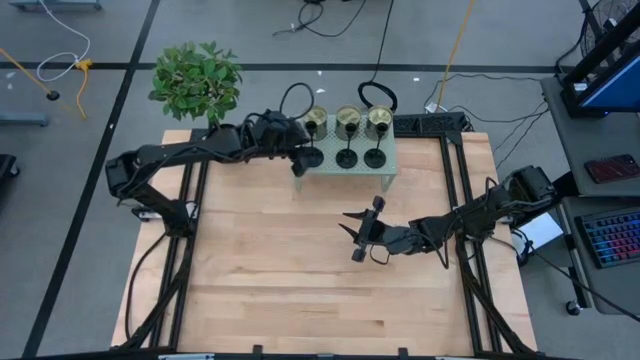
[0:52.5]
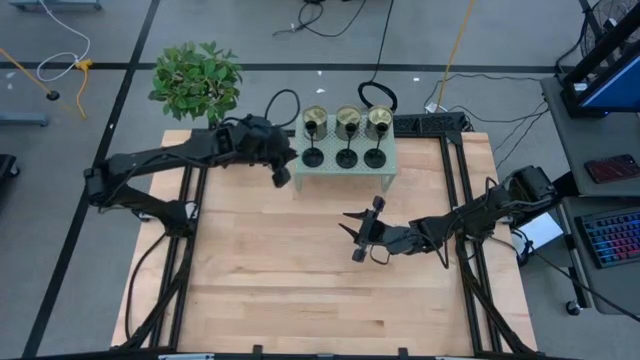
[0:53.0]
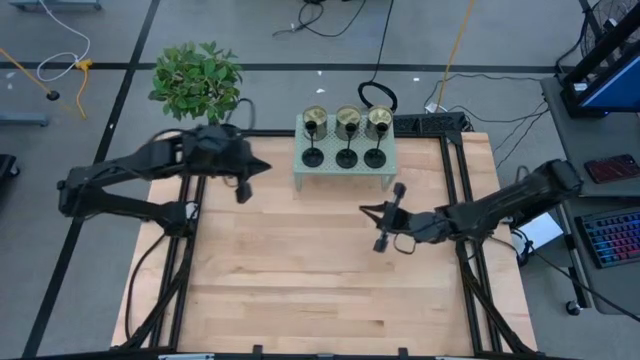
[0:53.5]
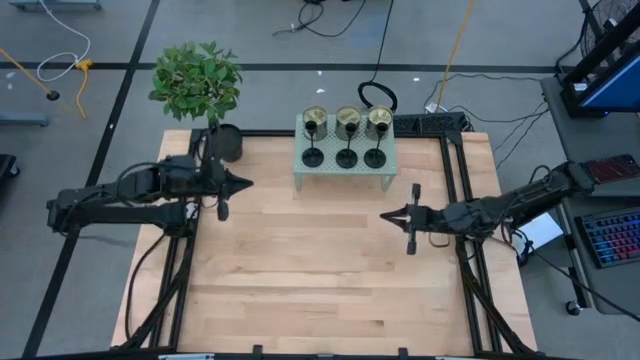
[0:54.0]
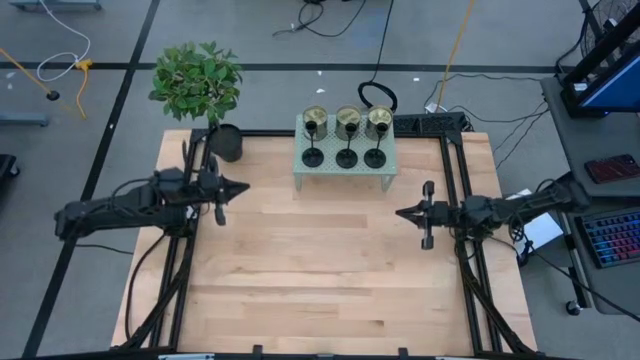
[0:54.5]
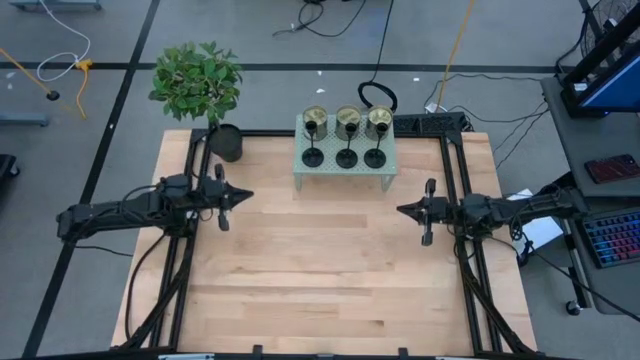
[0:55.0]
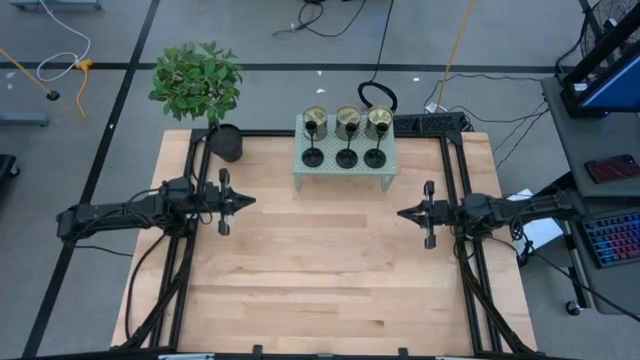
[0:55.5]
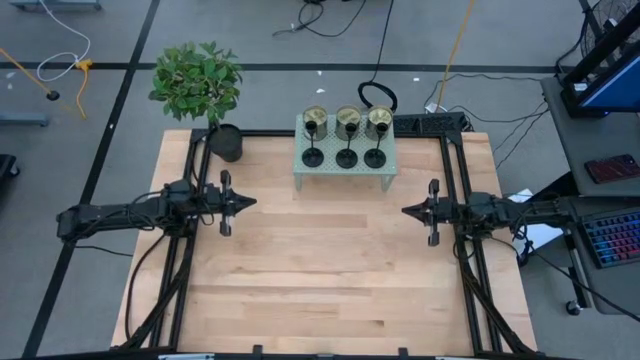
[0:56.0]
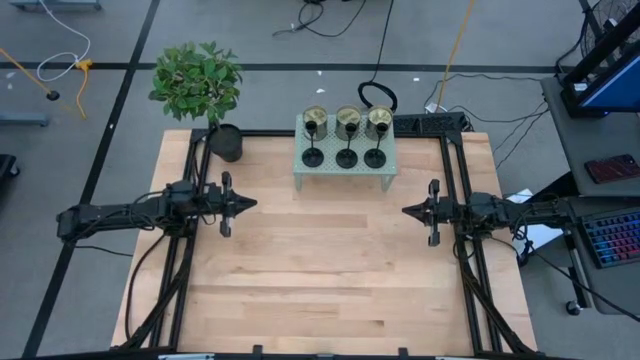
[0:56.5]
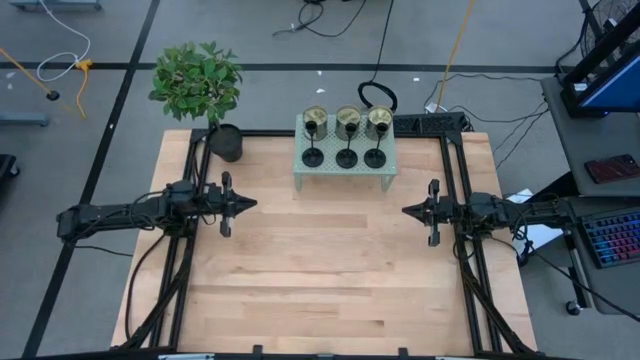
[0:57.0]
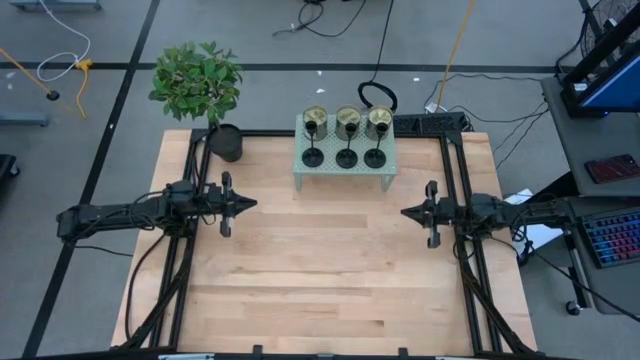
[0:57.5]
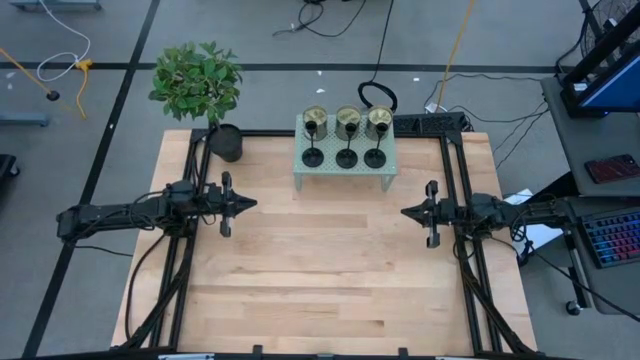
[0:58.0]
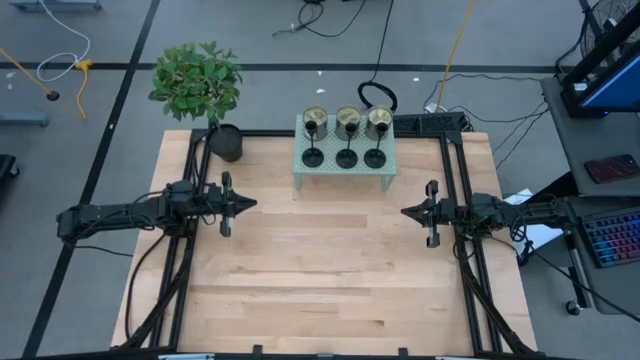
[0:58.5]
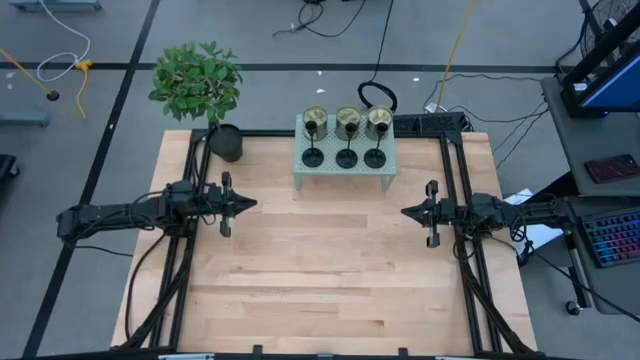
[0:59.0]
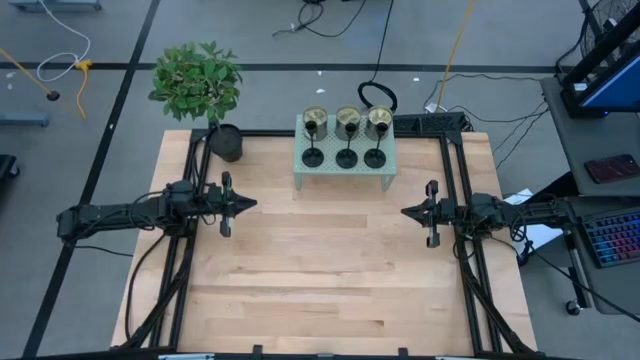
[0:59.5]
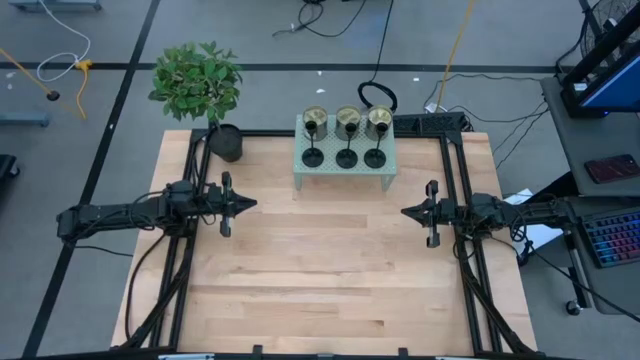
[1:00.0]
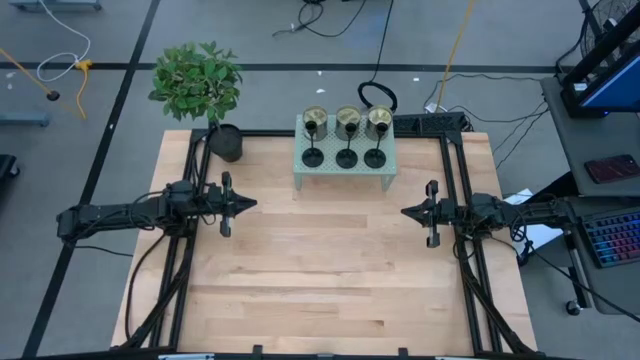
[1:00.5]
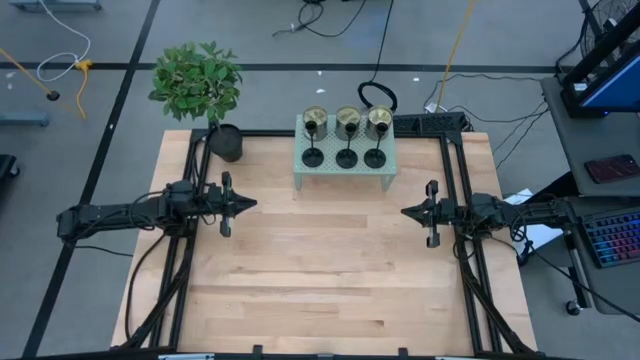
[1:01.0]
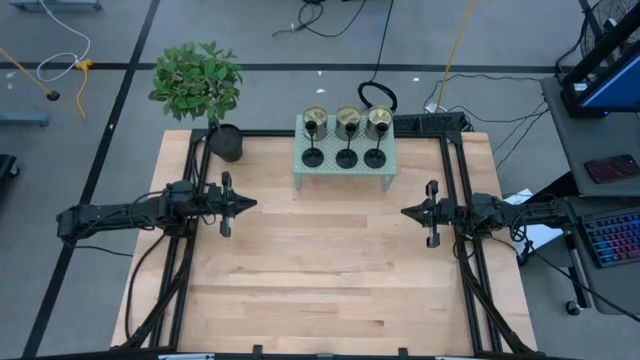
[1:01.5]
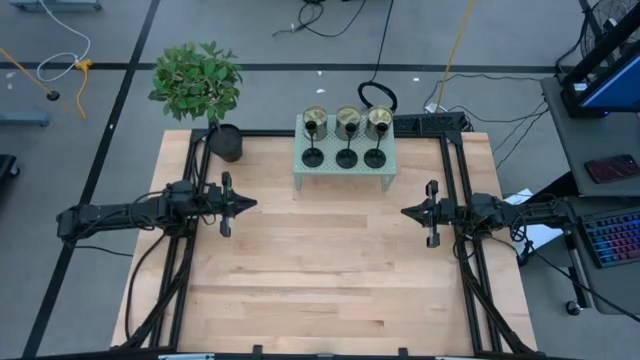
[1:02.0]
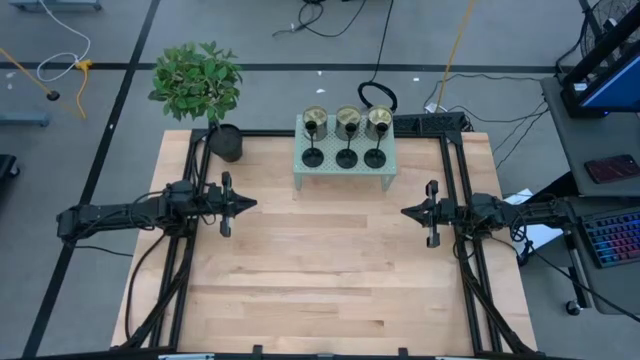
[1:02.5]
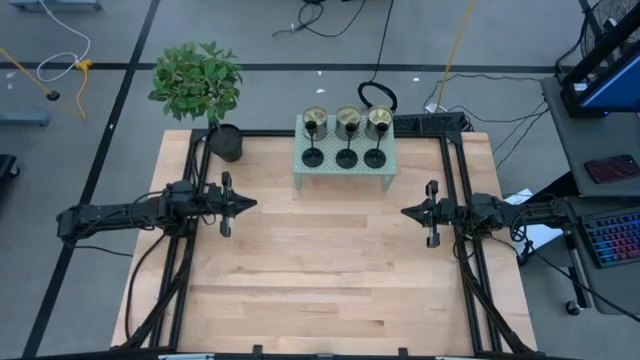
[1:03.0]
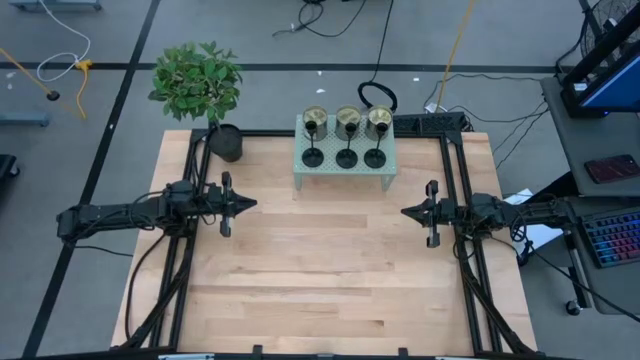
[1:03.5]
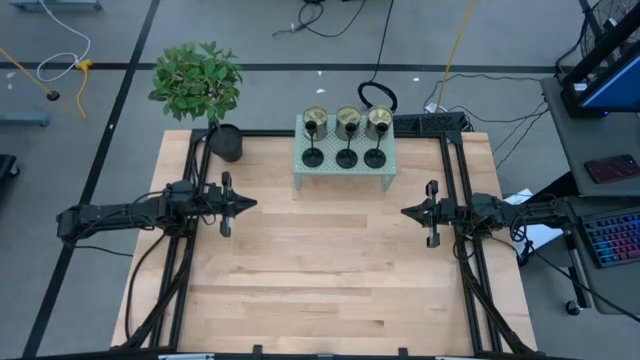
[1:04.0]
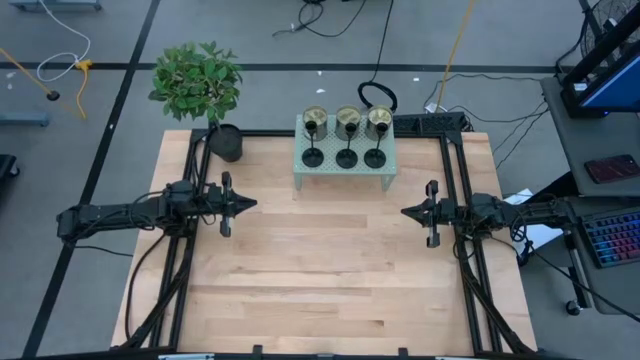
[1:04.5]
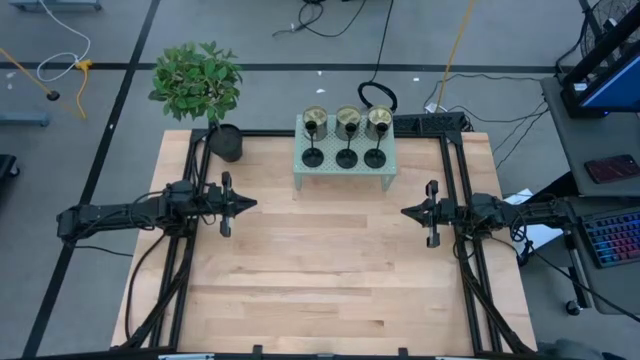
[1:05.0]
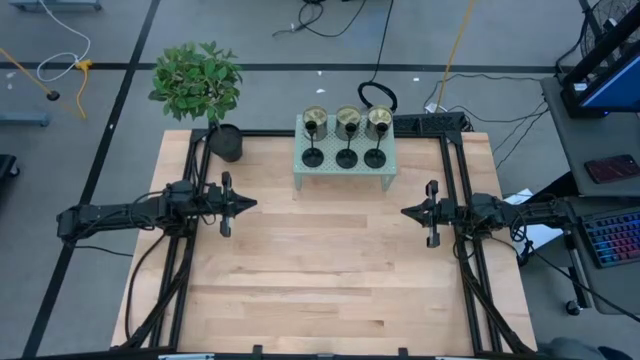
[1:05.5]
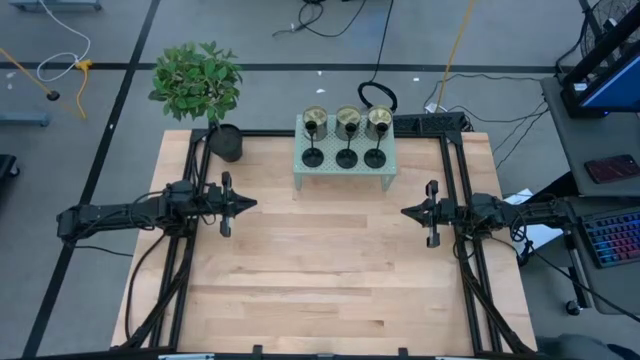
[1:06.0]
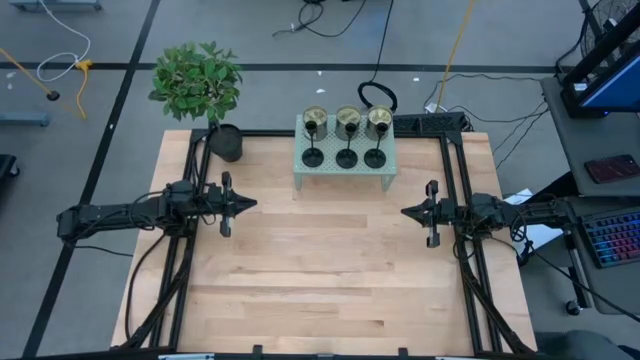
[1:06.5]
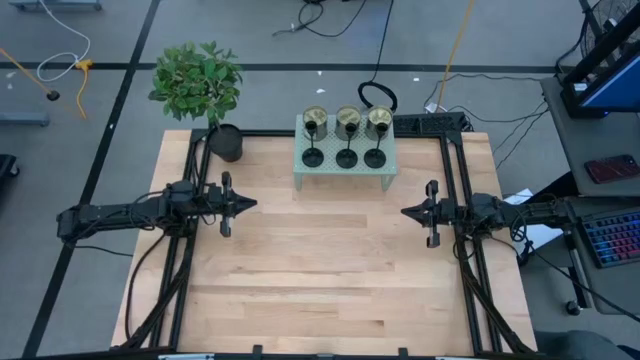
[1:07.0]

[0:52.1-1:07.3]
Task: Pick & Place candle stick holders
Return to Home Position

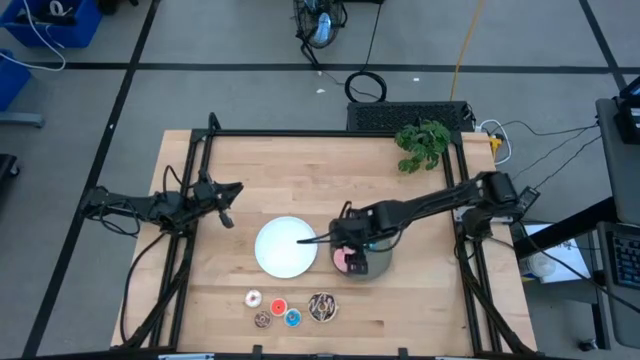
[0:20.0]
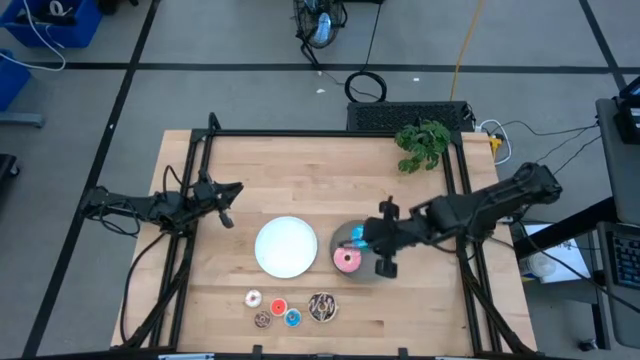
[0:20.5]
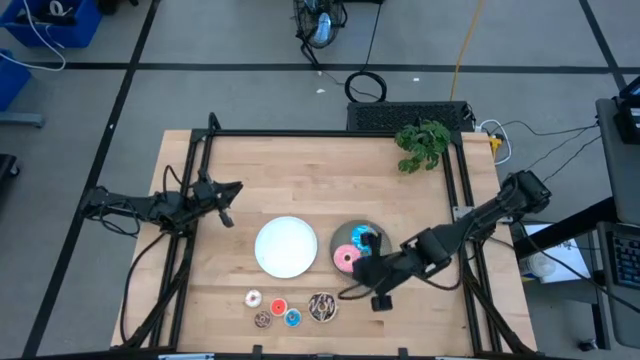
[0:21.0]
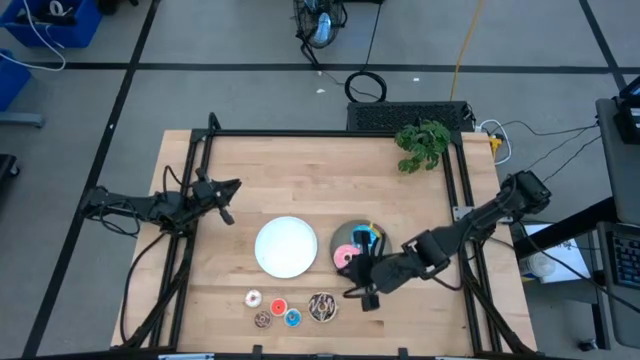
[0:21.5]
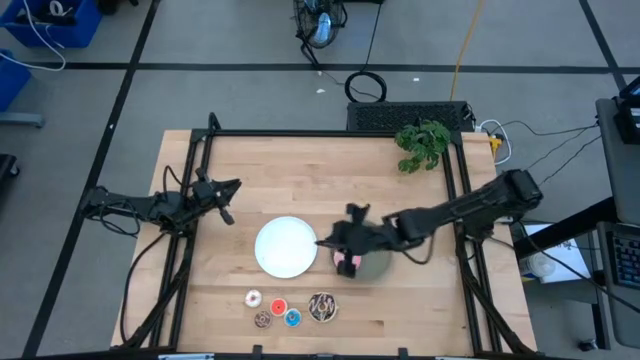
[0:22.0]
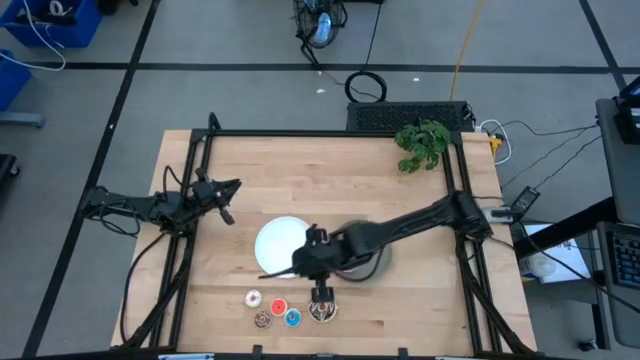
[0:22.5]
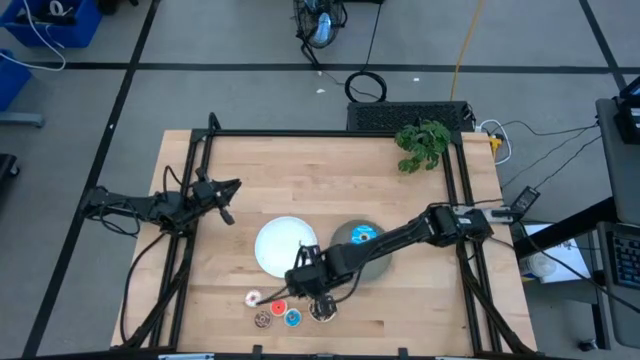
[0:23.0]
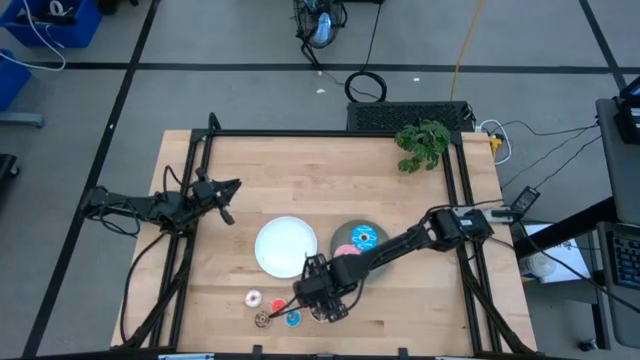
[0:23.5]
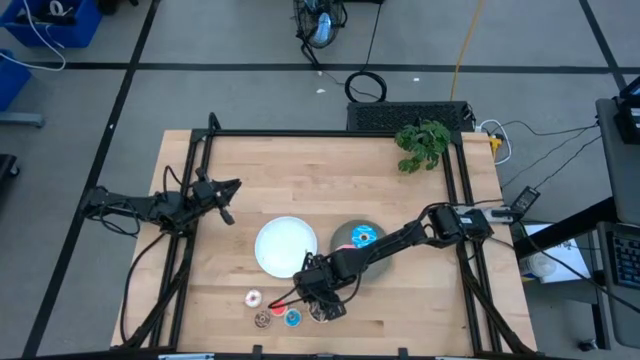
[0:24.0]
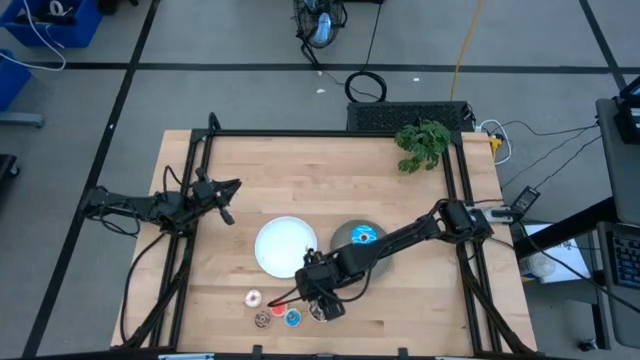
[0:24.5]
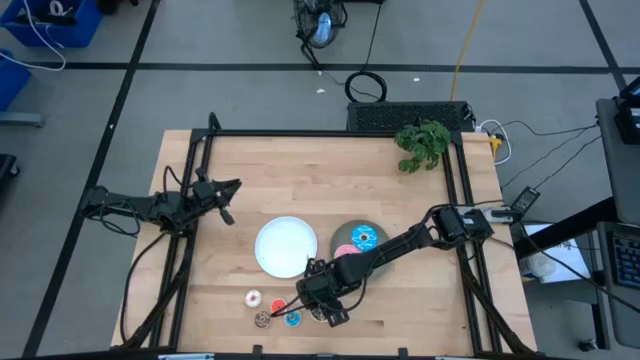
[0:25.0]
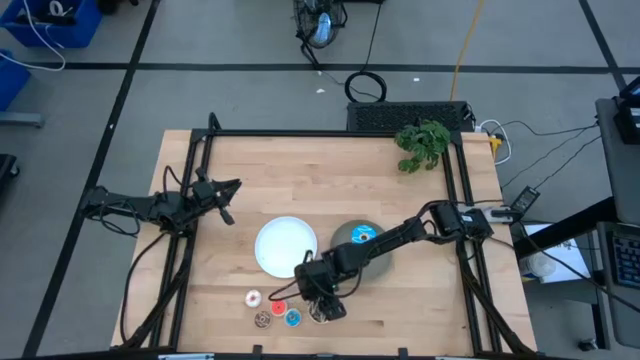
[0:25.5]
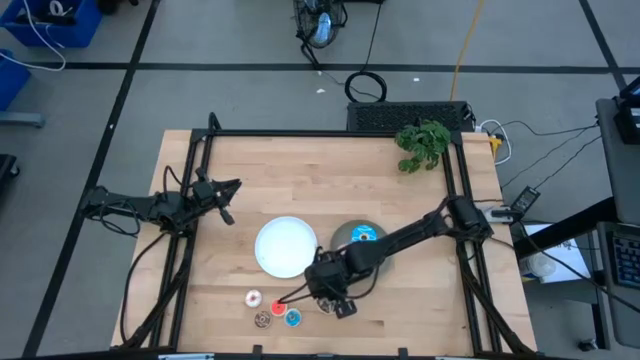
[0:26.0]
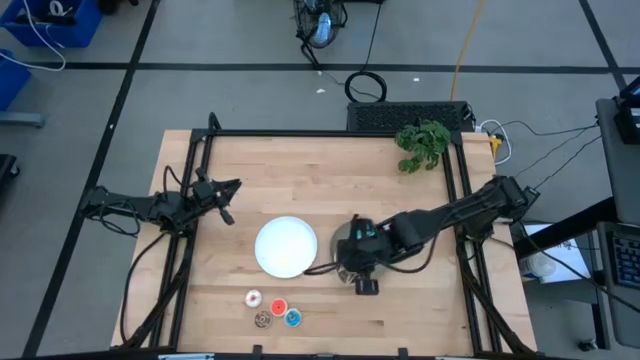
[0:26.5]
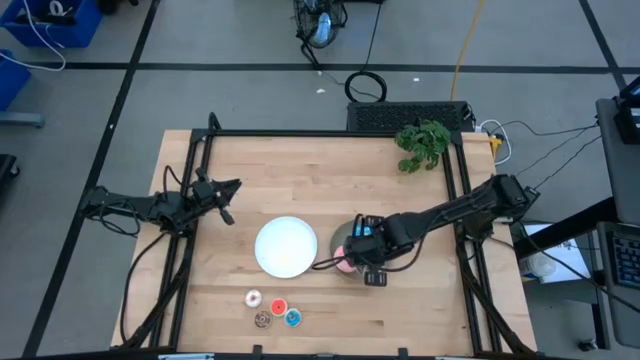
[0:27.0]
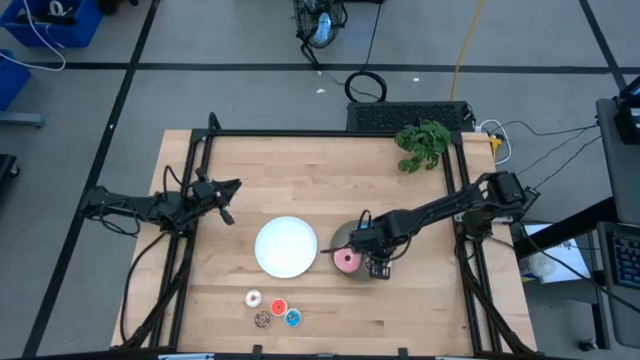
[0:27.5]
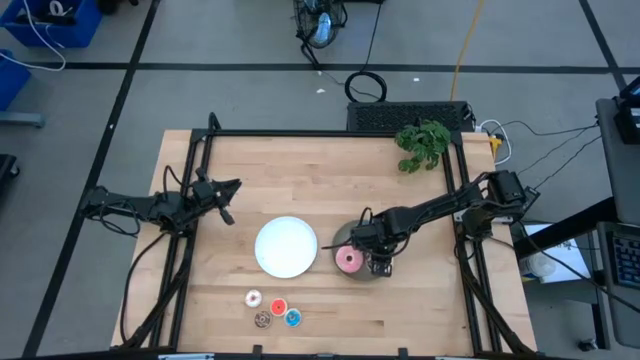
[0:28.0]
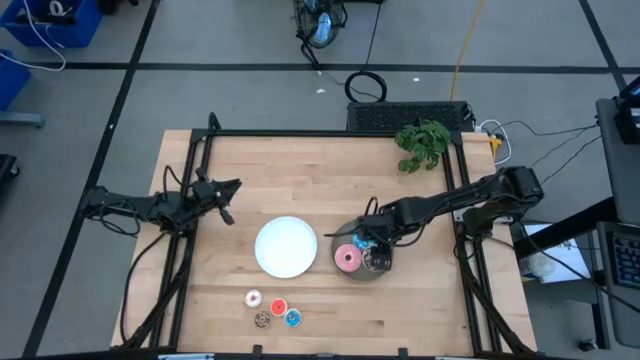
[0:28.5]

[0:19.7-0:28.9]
Task: Pick & Place donuts
Put the large black donut on the gray plate
